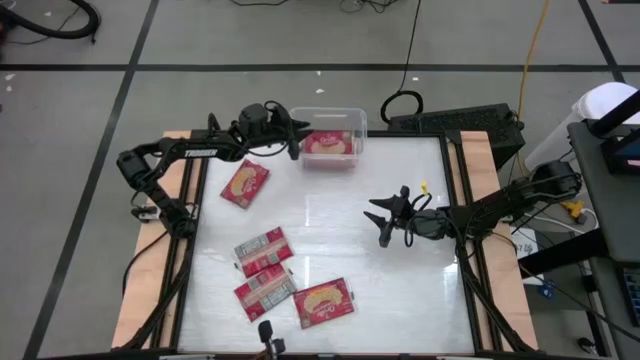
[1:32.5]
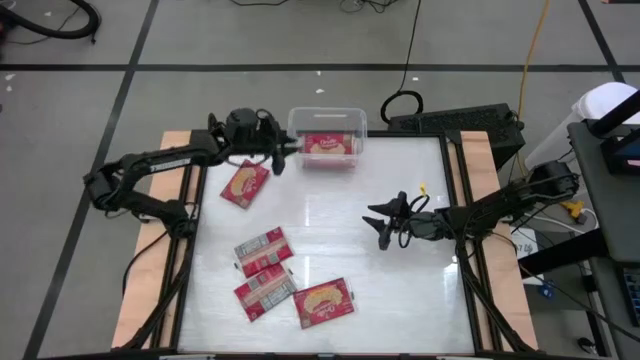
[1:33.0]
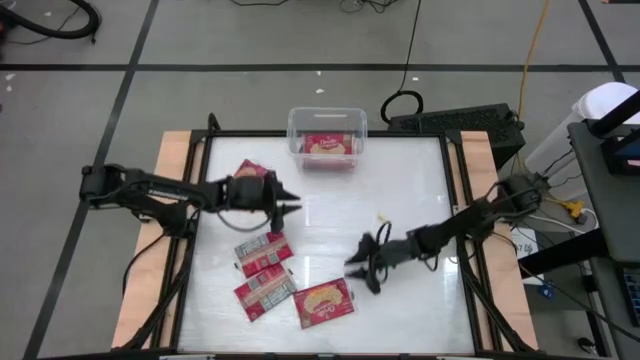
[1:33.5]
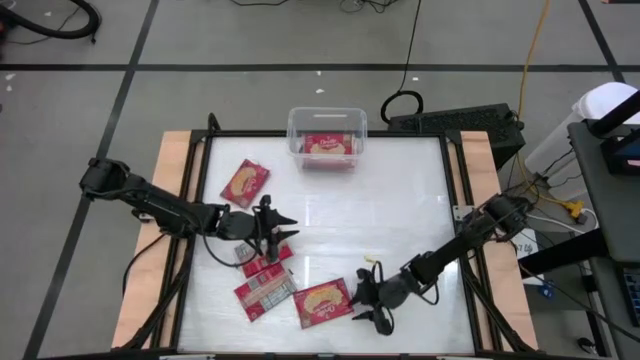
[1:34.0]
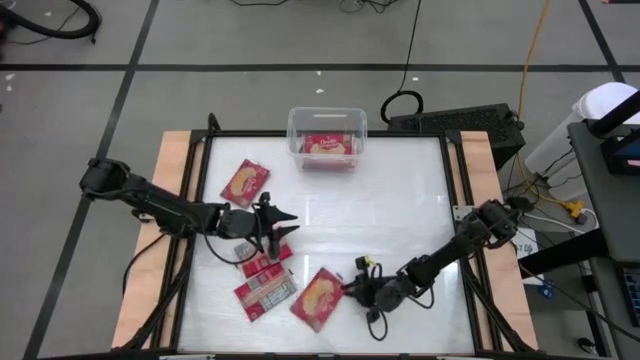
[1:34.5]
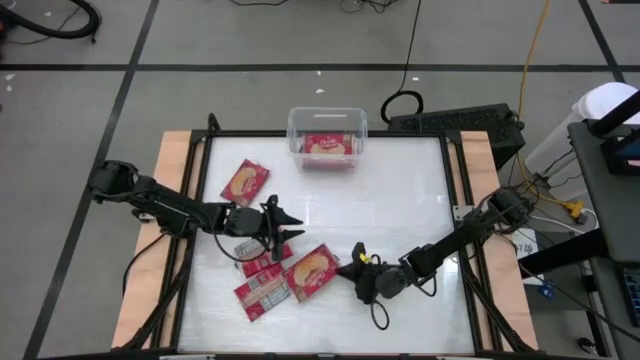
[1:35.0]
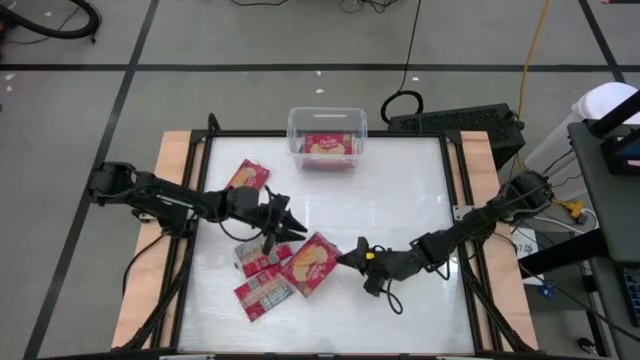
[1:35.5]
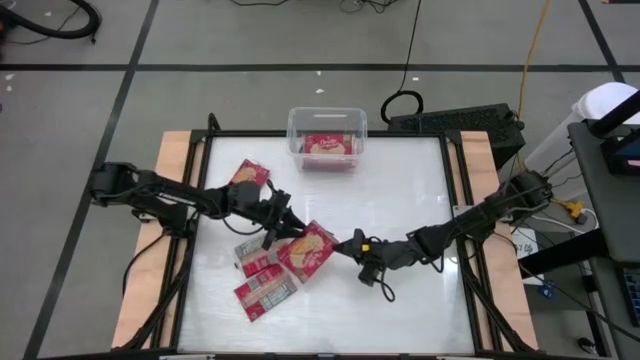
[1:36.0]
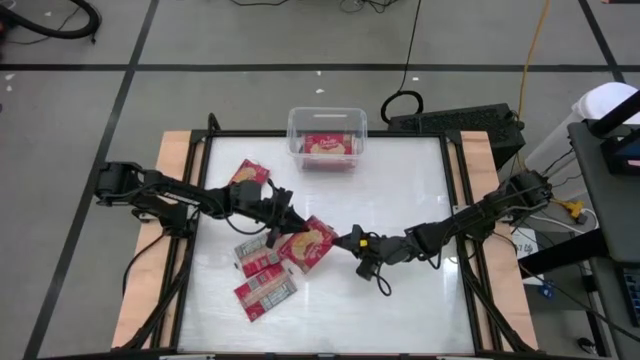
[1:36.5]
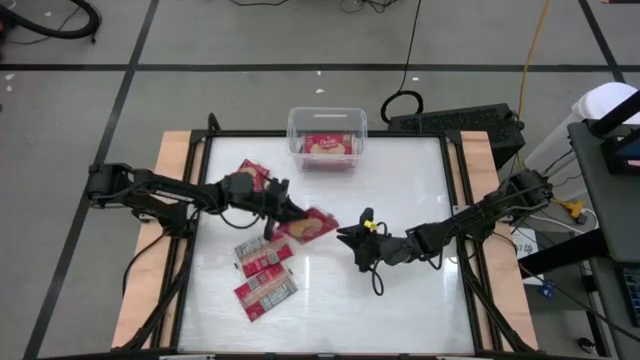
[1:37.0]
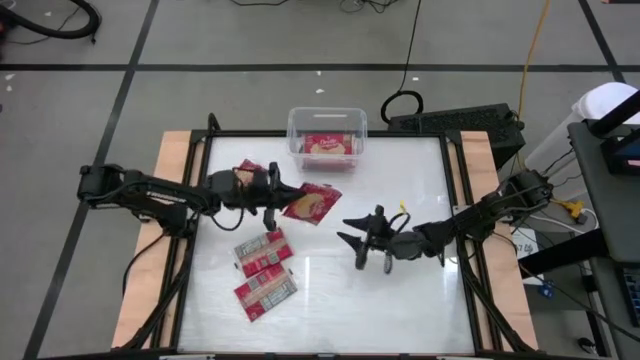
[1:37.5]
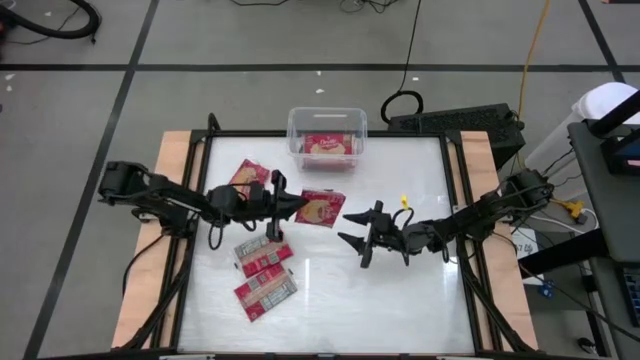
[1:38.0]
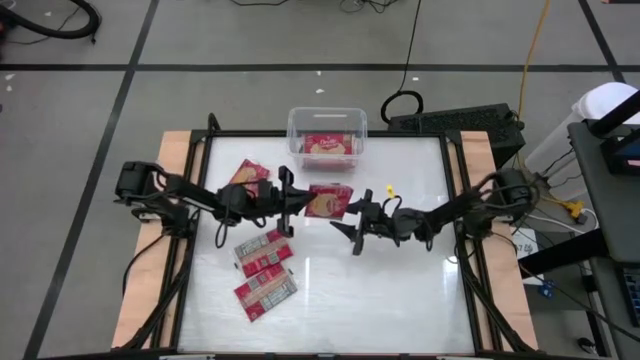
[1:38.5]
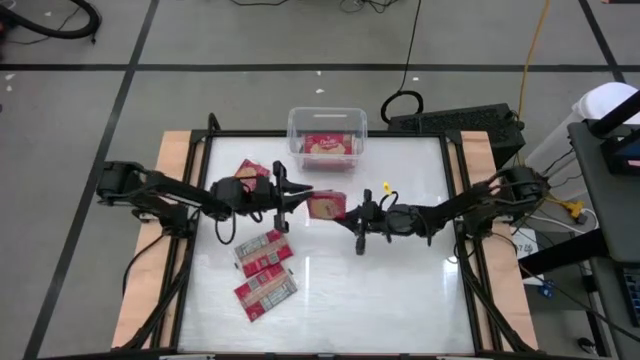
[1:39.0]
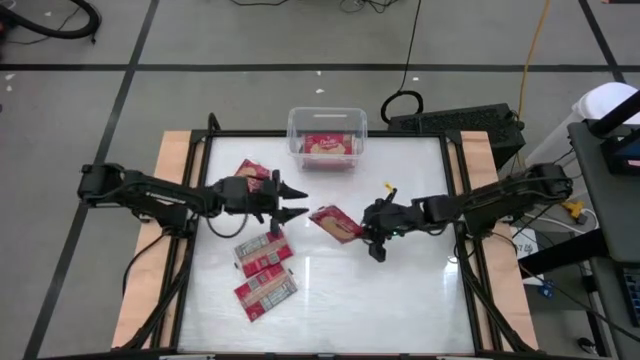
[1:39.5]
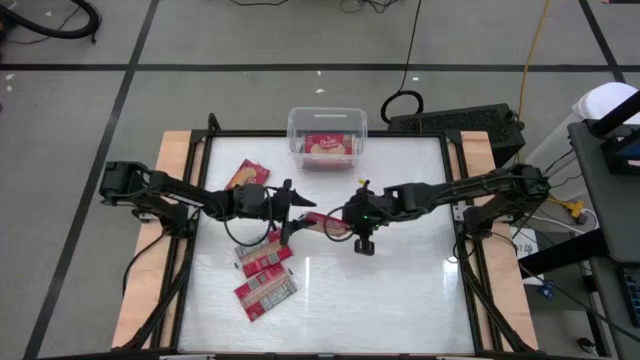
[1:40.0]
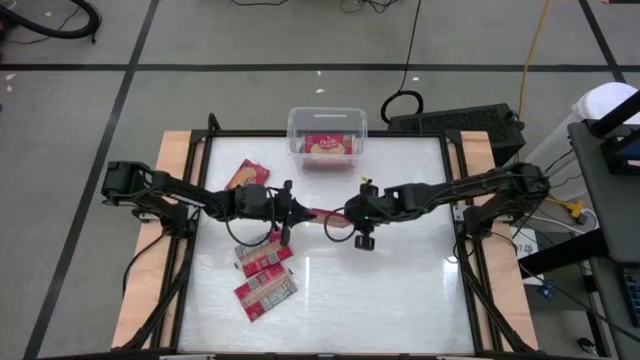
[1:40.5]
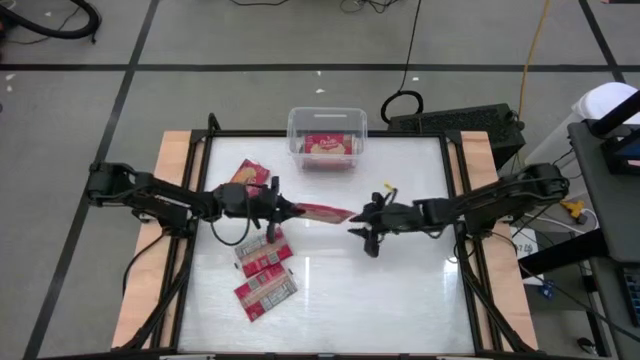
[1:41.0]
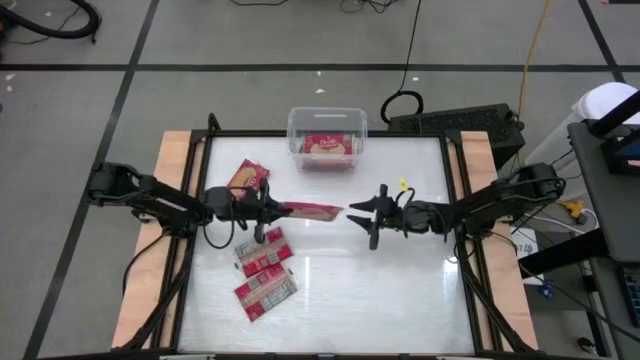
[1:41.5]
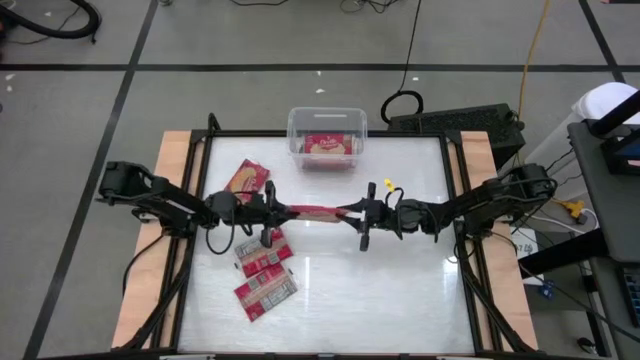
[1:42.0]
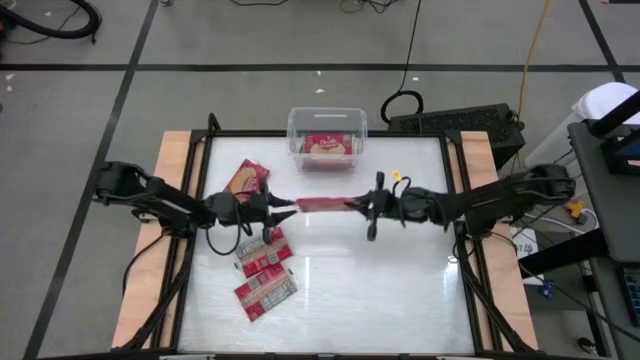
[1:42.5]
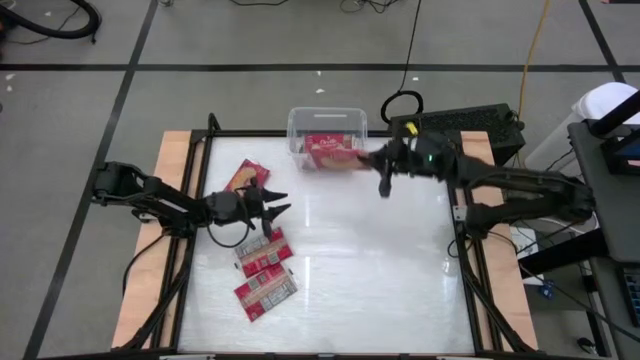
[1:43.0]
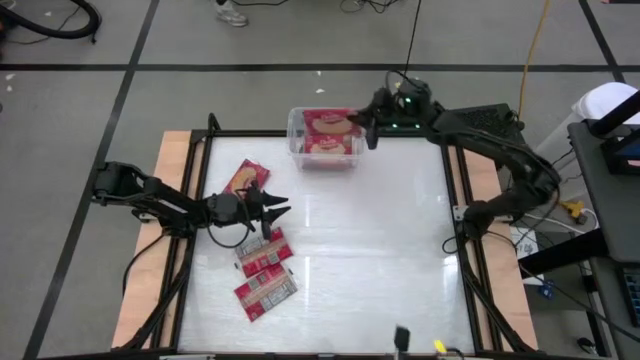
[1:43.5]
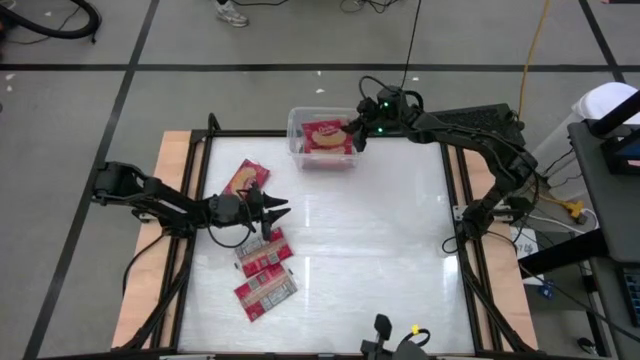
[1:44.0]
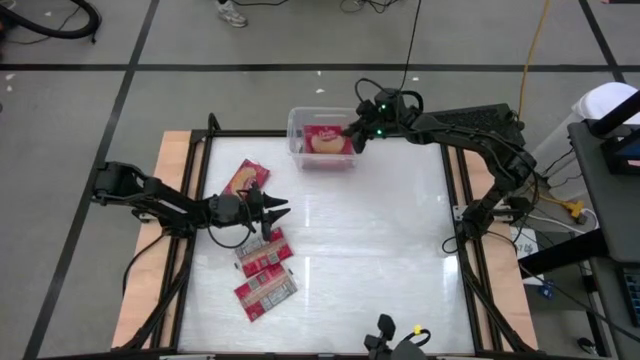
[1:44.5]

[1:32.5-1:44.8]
Task: Sort popcorn bags into baskets
Put the popcorn bag into the transparent bin

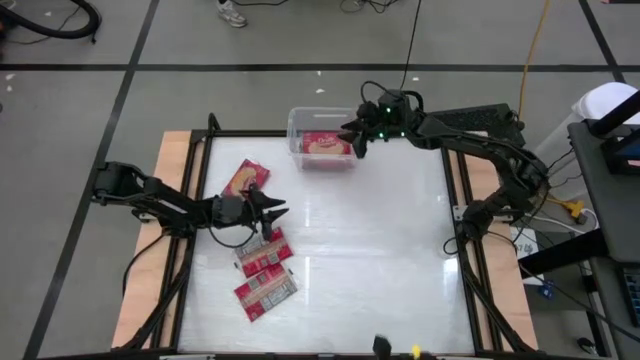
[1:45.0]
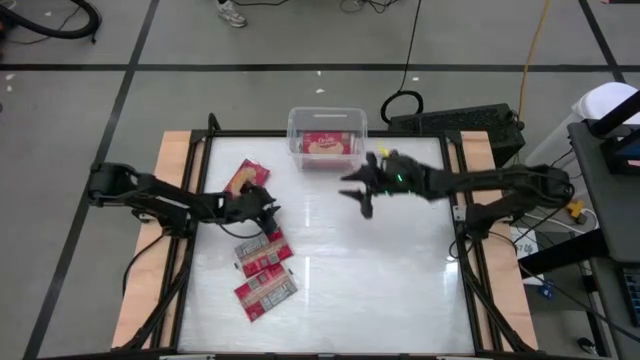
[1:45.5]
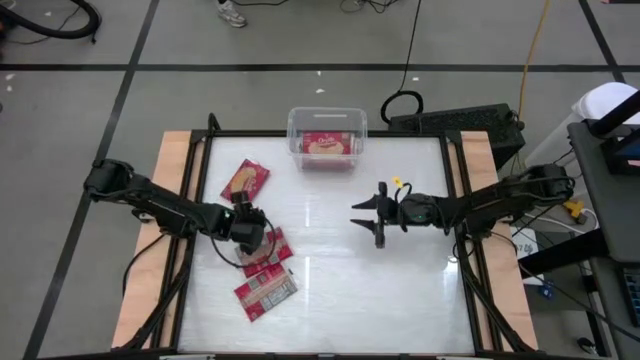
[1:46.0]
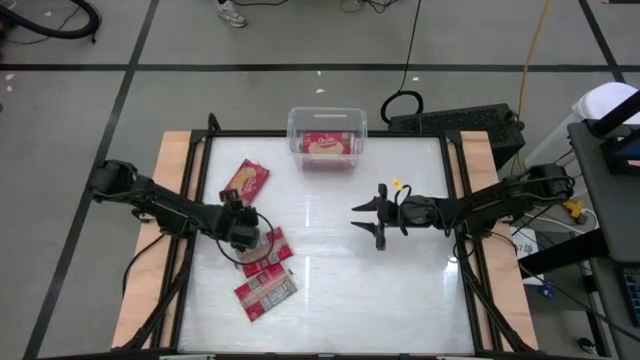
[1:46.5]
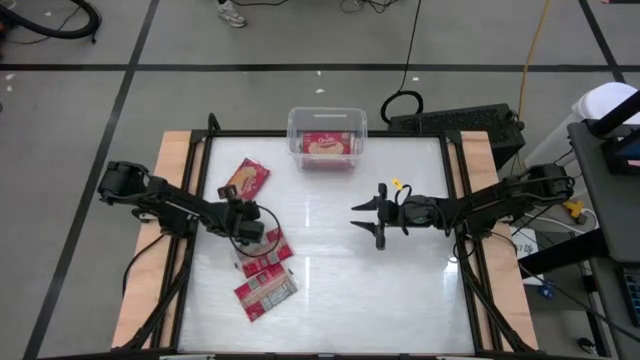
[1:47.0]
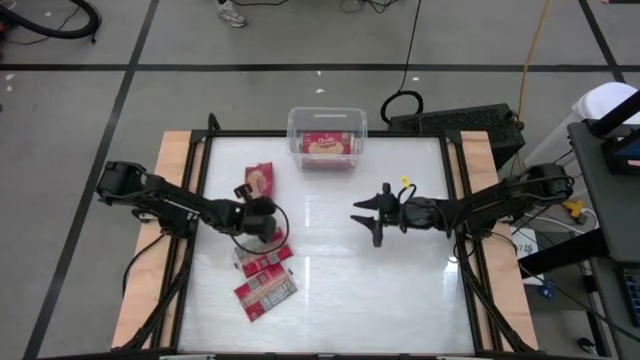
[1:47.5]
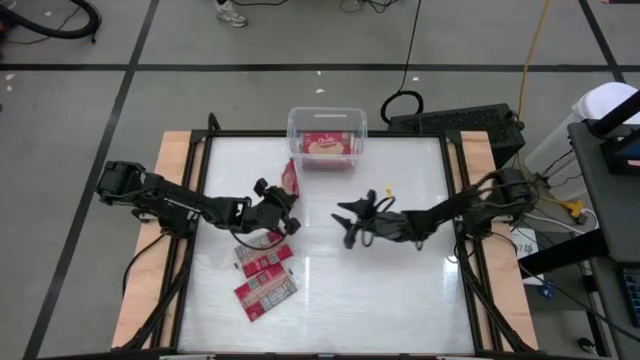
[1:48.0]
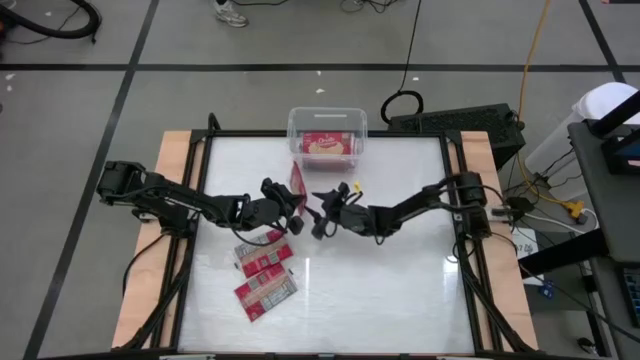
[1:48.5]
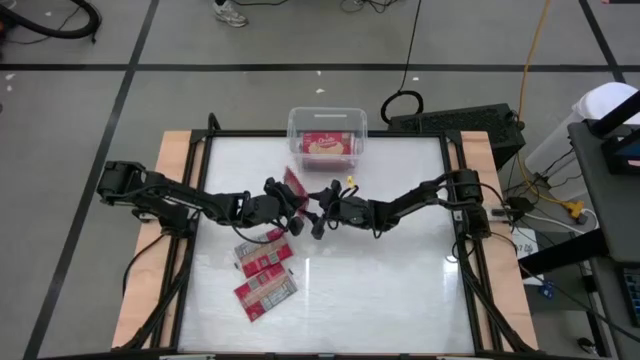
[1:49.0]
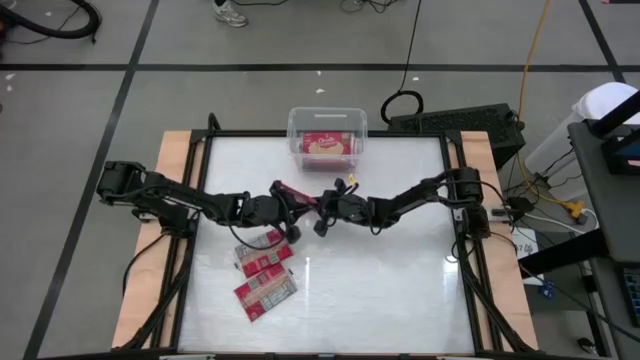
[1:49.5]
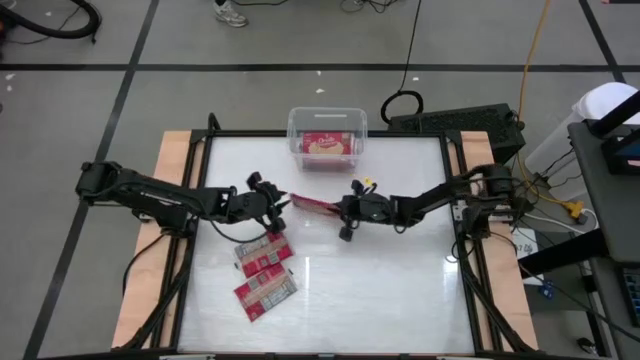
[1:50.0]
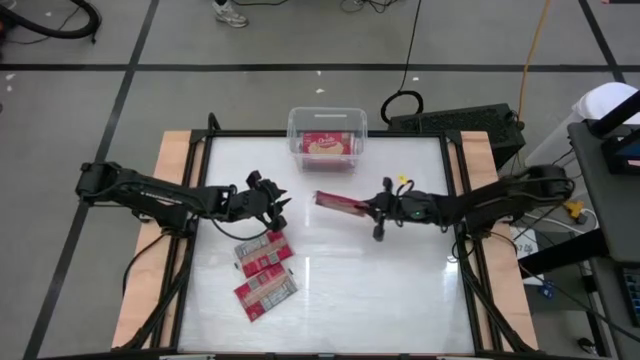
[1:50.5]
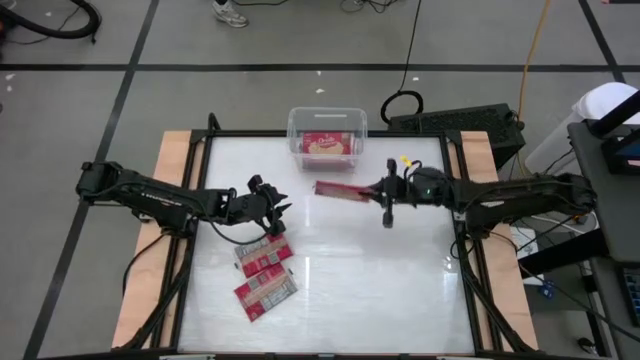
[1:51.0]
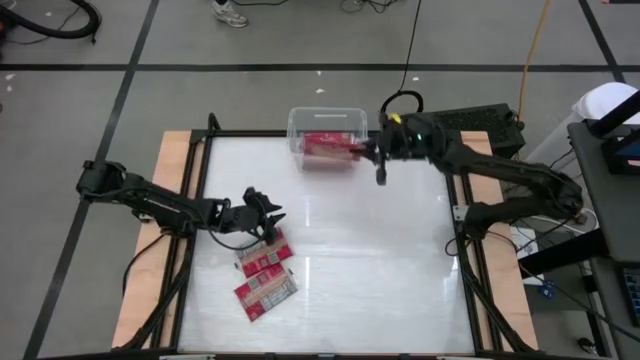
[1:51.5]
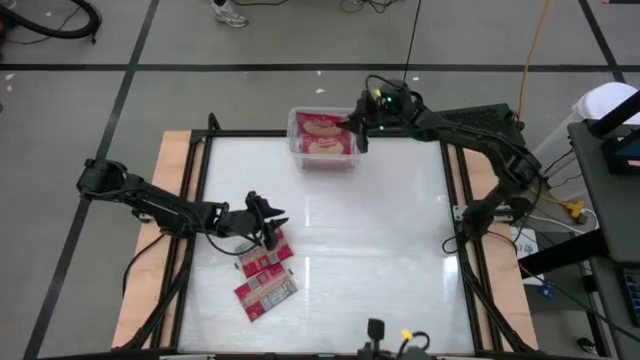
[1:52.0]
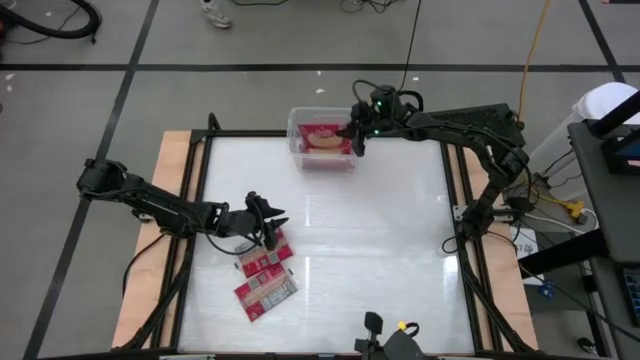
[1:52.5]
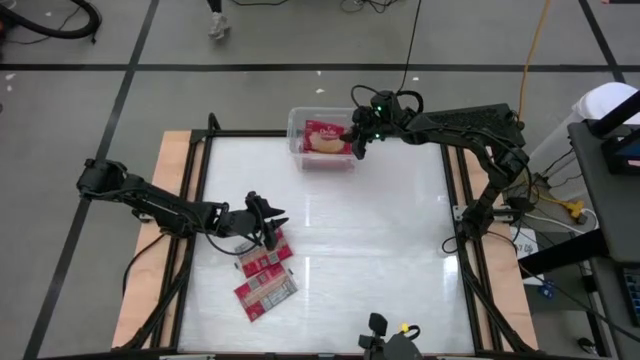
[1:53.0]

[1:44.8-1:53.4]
Put the popcorn bag into the transparent bin

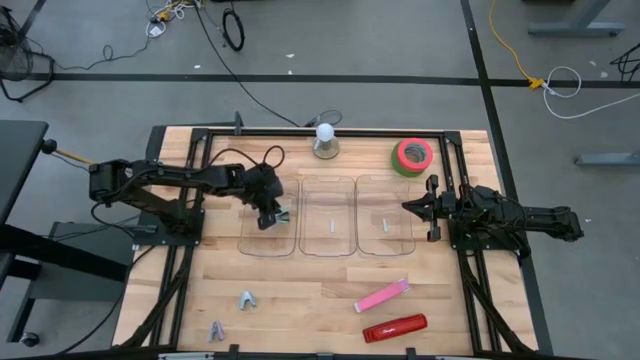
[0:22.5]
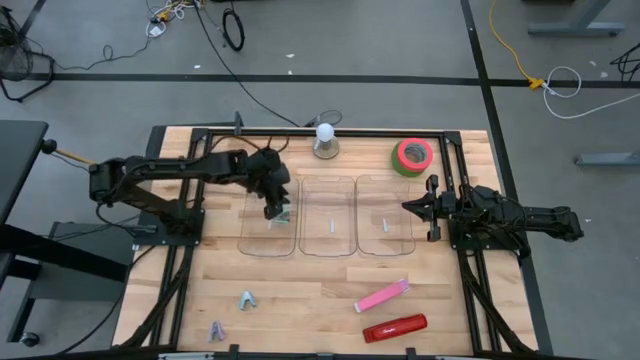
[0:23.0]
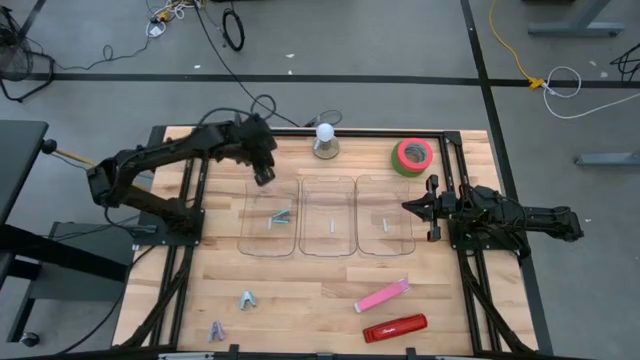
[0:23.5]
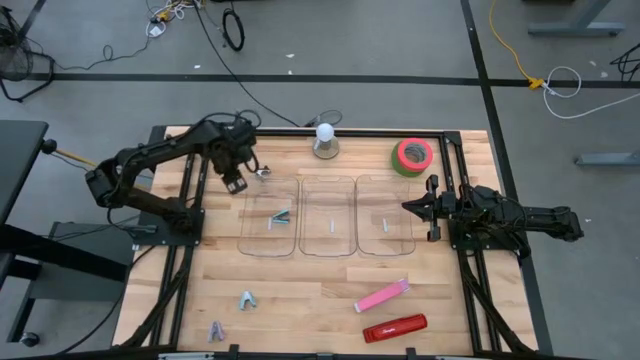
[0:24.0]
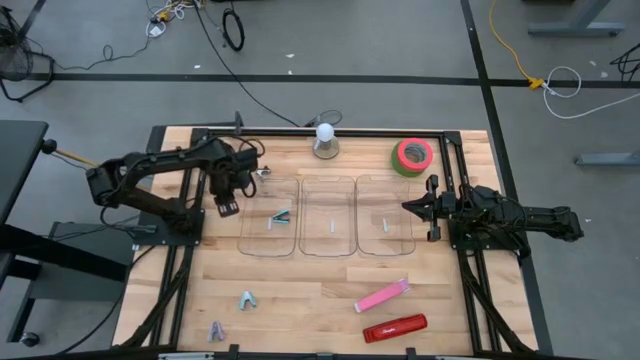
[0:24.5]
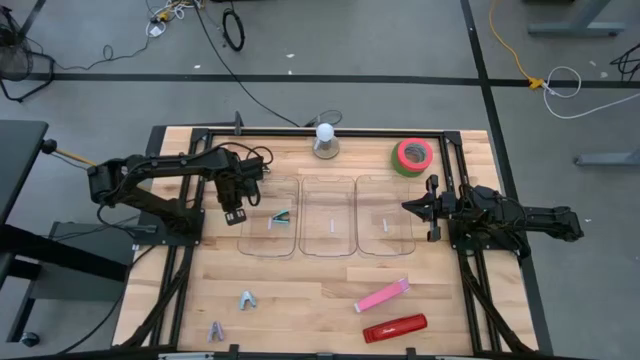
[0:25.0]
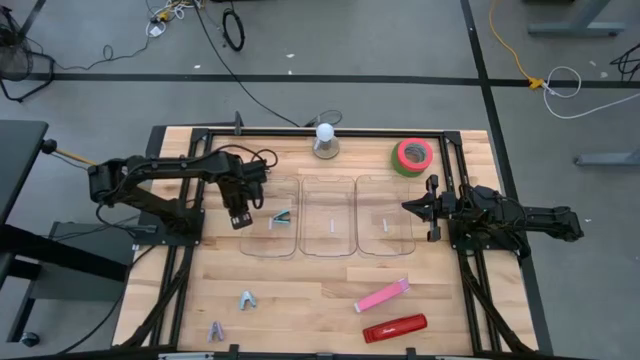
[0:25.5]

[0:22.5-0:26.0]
Task: Pick and place Stapler, Stapler remover, tape
Adjust the left transparent bin
